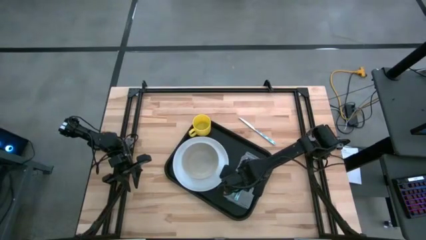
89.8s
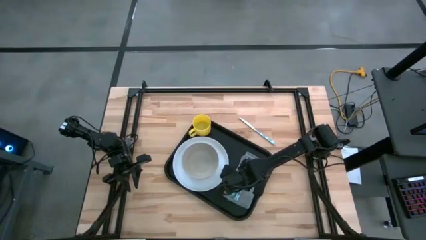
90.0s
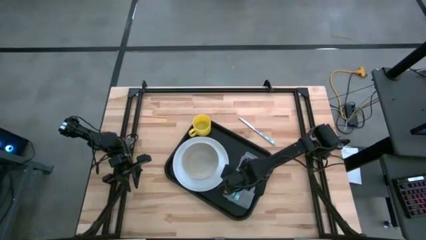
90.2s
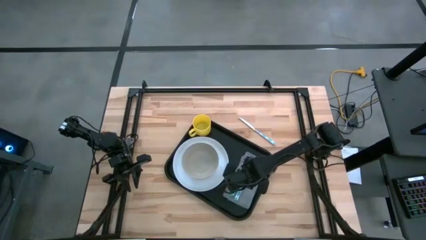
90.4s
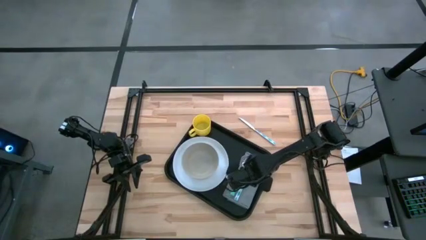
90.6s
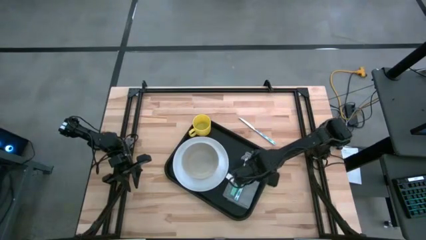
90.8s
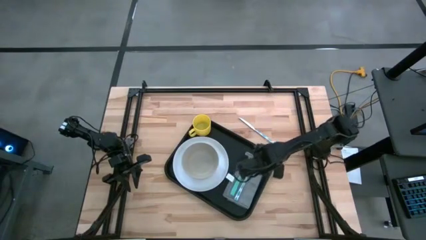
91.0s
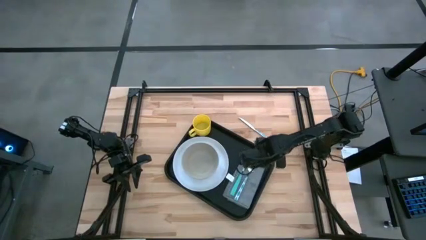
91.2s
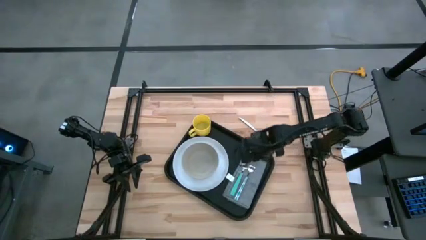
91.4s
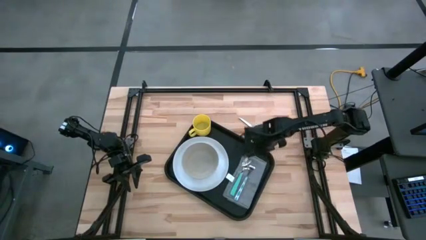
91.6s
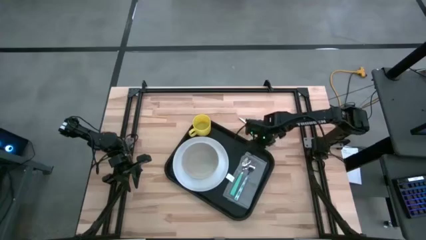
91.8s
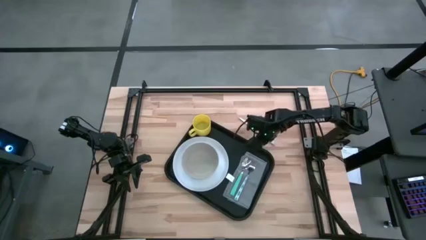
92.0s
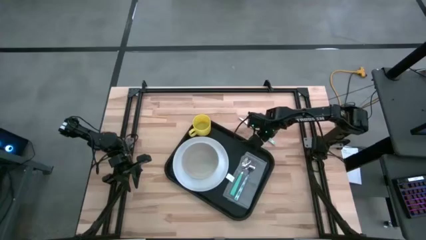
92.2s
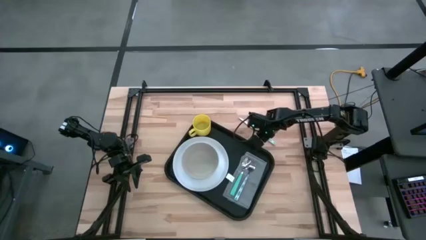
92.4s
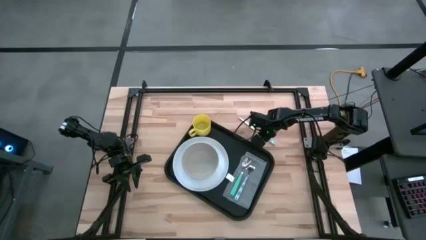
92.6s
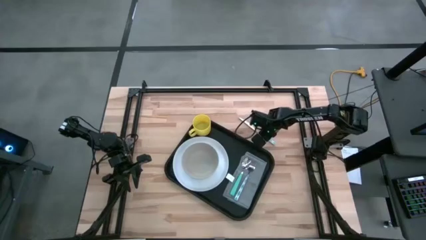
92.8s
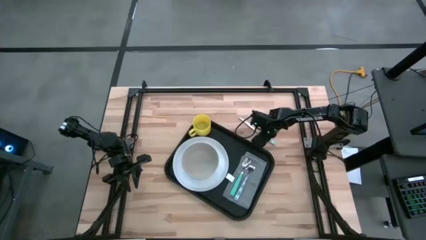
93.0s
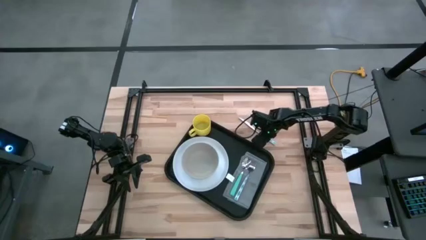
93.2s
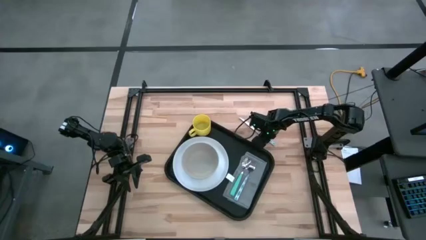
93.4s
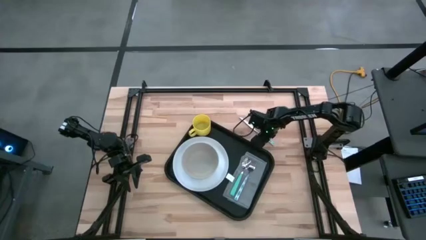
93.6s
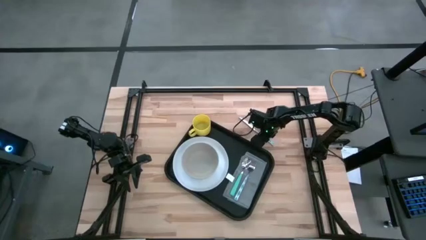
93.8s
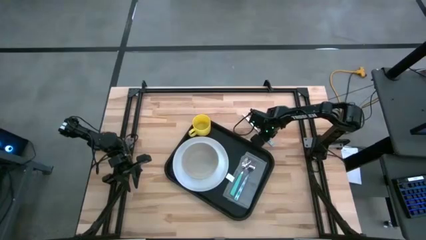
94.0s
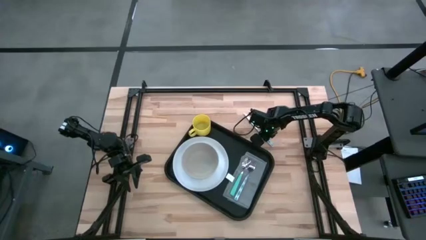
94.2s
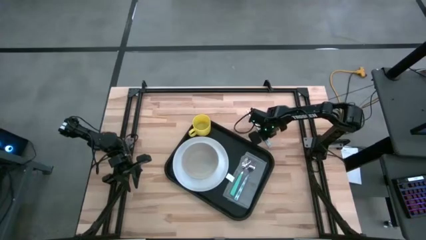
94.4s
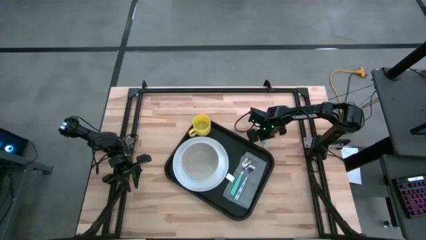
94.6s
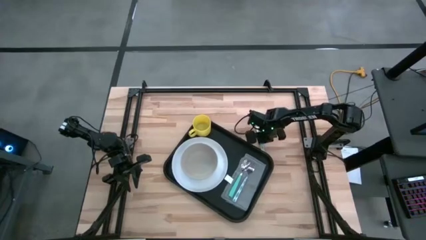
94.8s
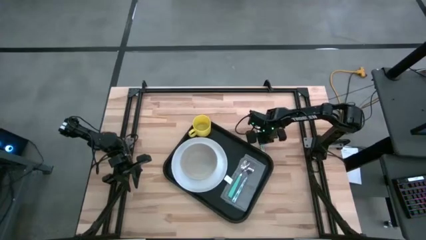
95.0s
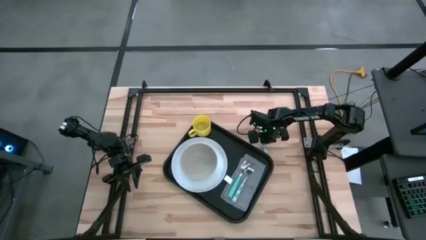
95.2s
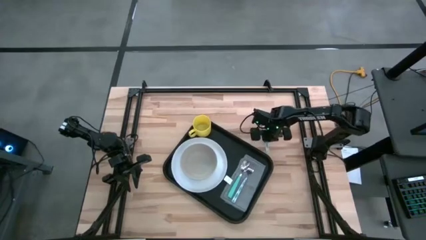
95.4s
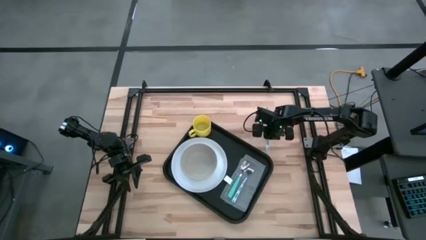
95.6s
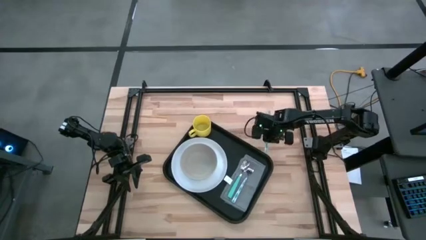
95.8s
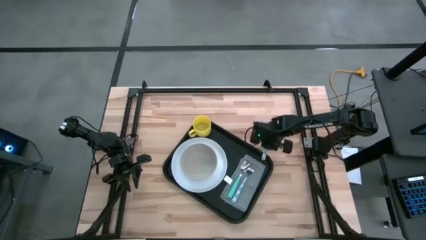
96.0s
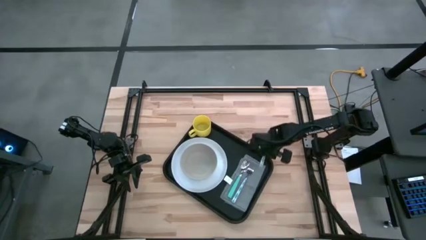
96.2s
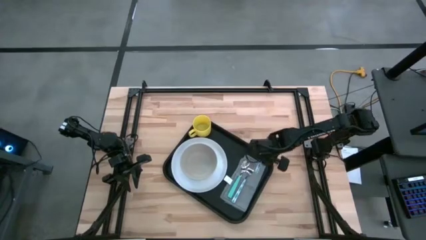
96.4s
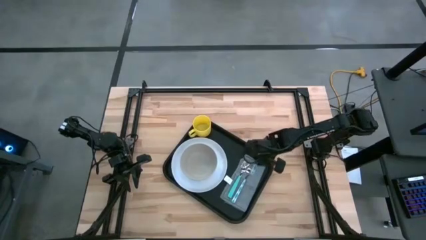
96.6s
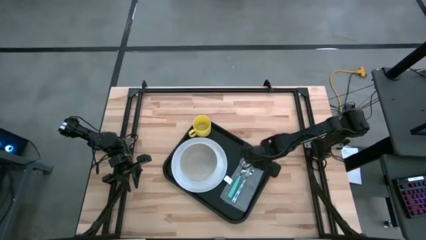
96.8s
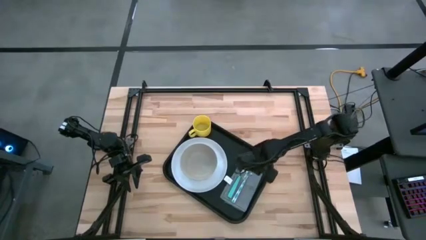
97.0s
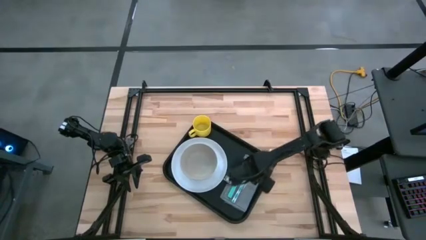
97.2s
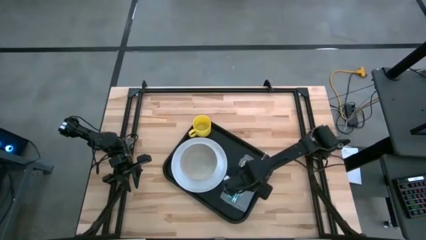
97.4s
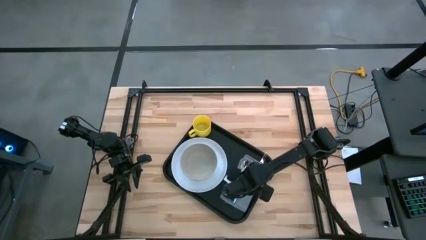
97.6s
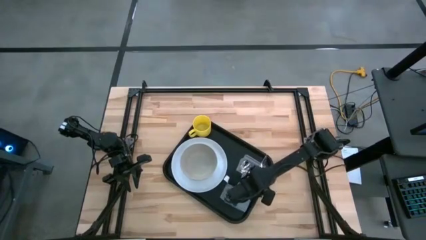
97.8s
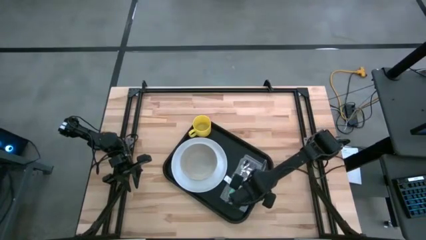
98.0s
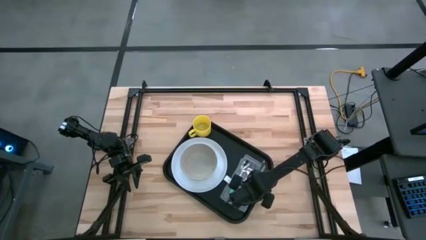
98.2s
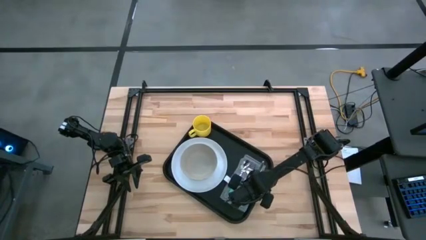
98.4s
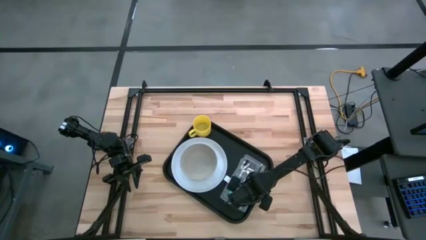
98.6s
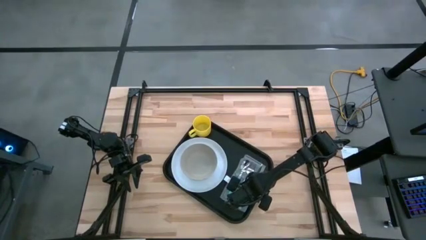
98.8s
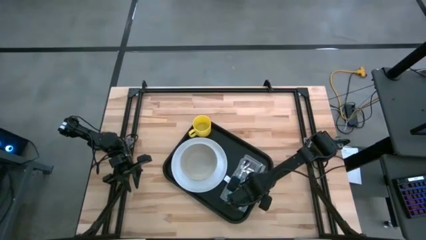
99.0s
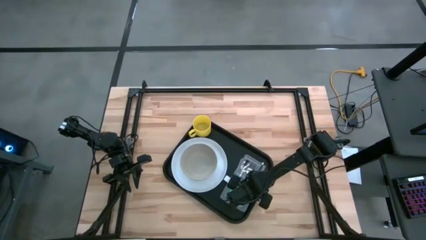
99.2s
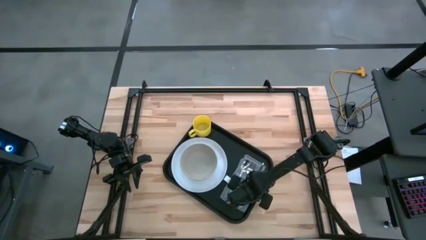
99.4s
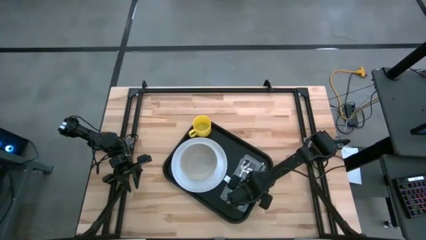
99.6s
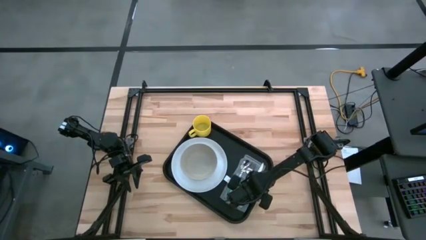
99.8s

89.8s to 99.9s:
Task: Set up tray
Put the blue knife on the gray napkin to the right of the blue fork

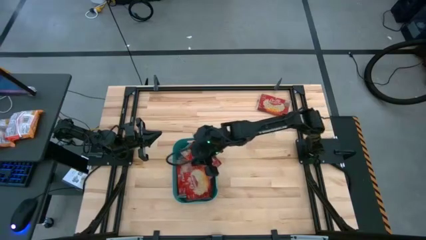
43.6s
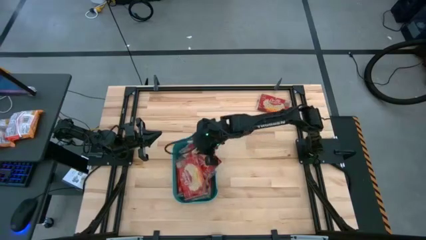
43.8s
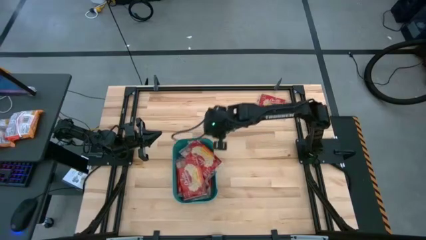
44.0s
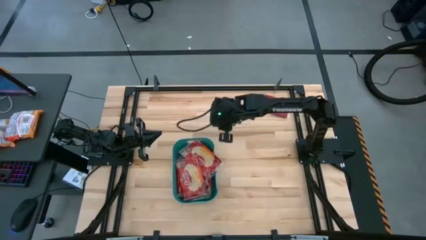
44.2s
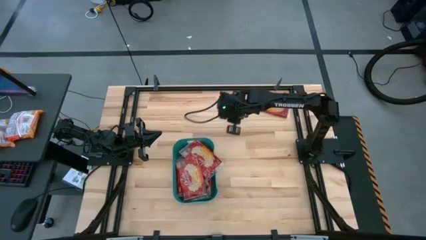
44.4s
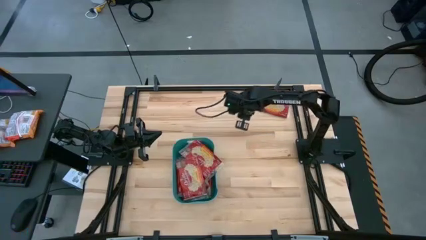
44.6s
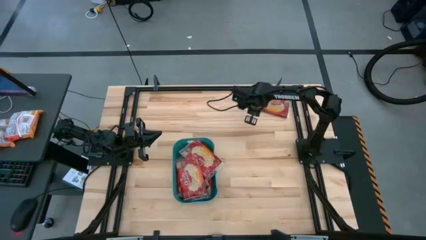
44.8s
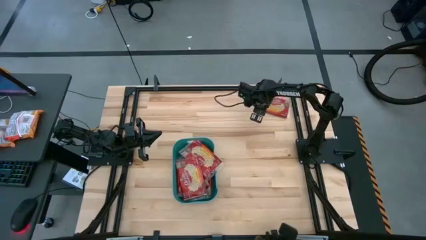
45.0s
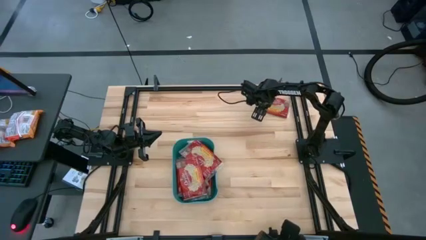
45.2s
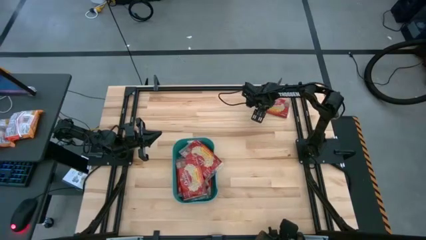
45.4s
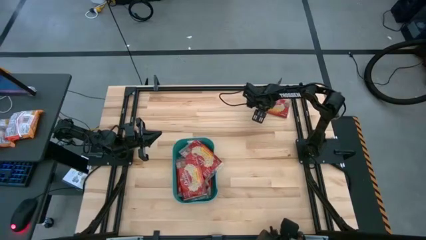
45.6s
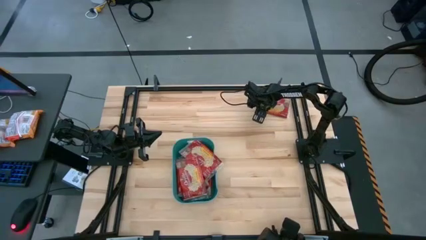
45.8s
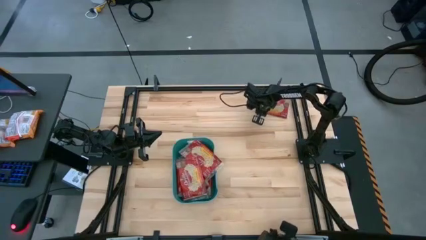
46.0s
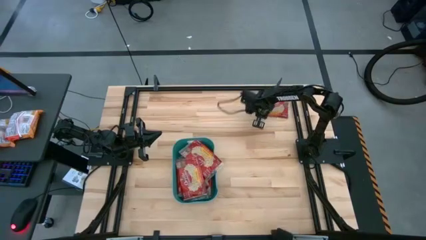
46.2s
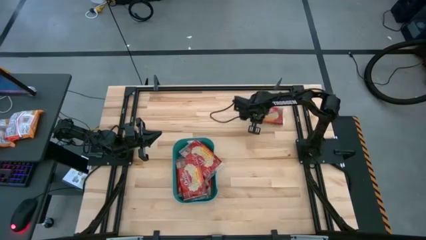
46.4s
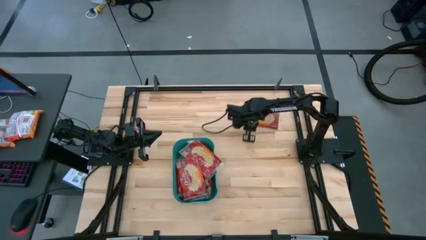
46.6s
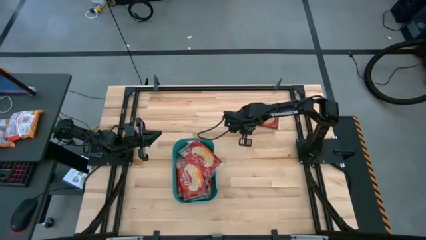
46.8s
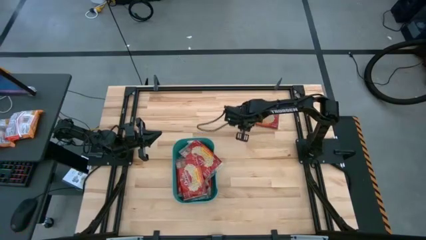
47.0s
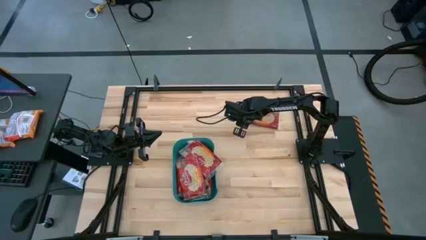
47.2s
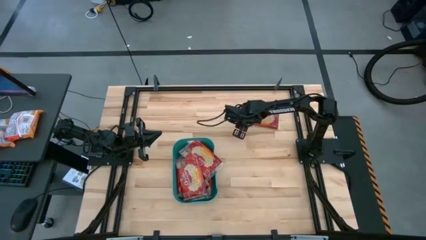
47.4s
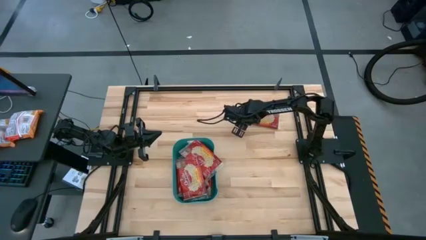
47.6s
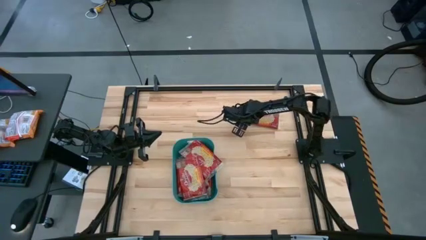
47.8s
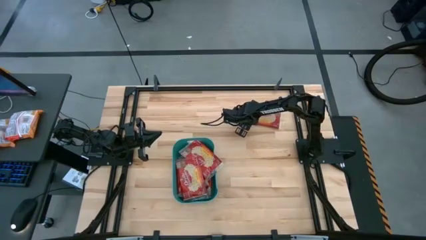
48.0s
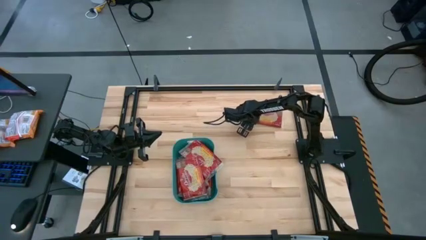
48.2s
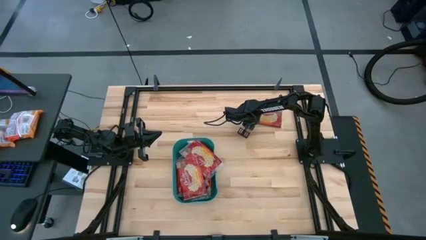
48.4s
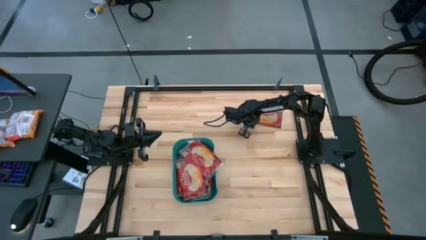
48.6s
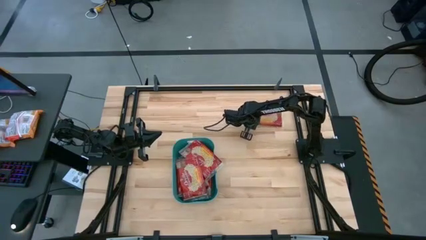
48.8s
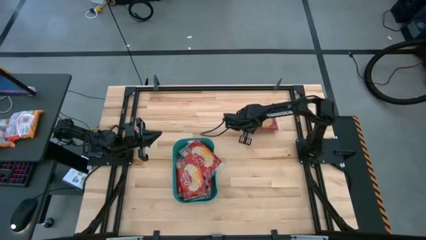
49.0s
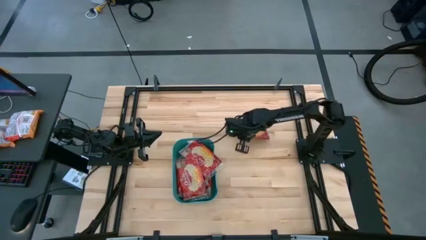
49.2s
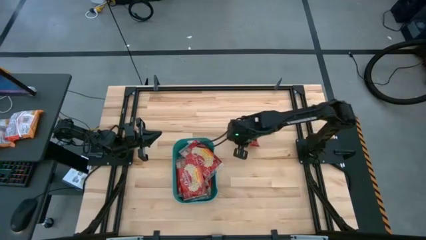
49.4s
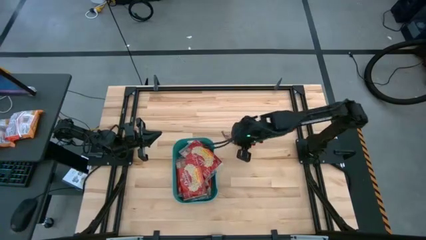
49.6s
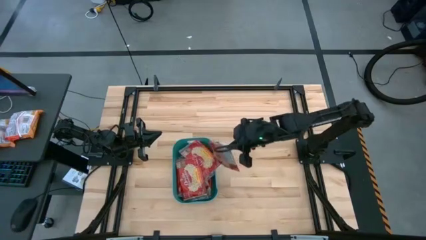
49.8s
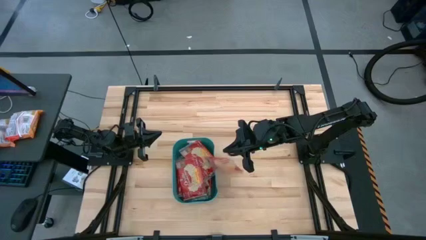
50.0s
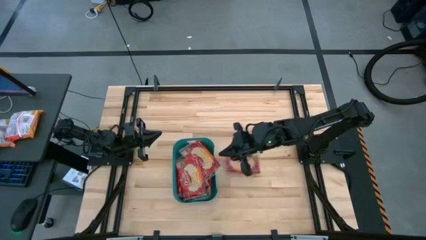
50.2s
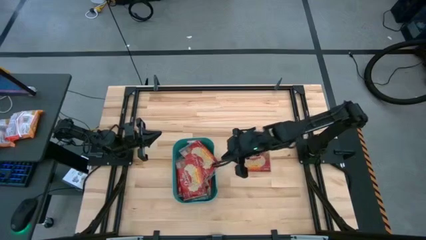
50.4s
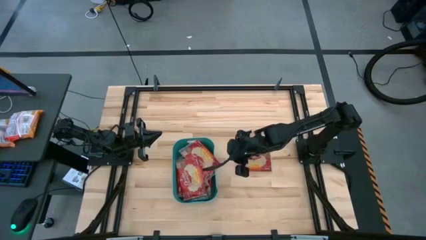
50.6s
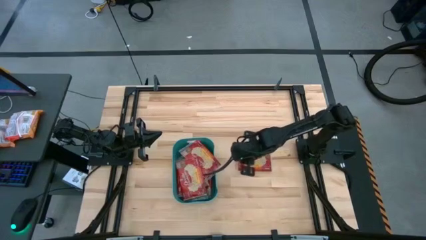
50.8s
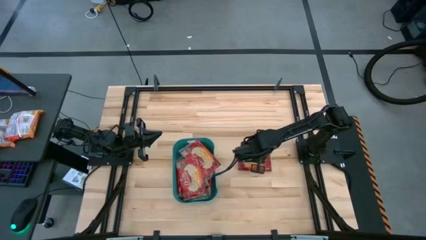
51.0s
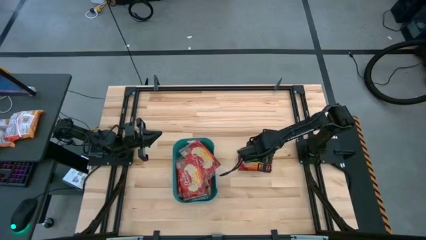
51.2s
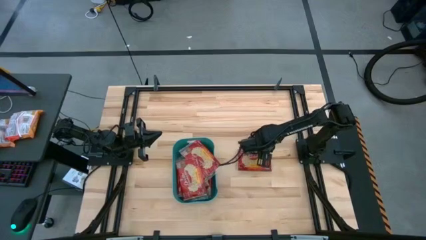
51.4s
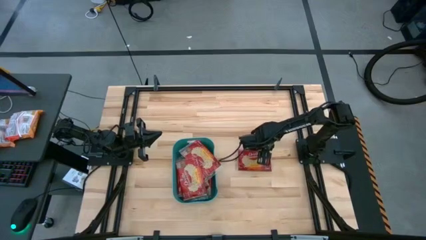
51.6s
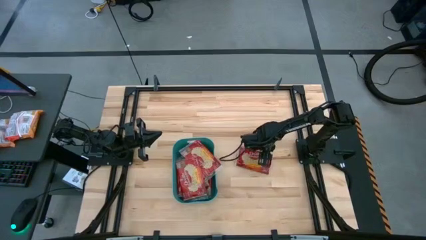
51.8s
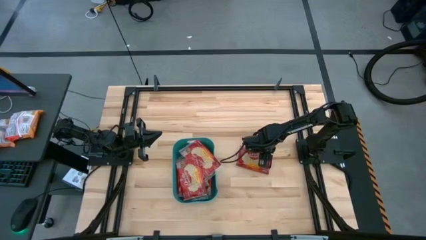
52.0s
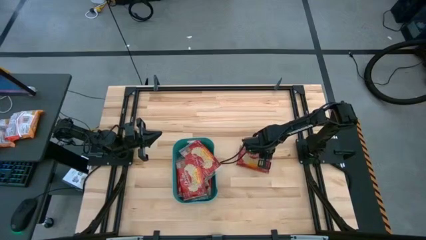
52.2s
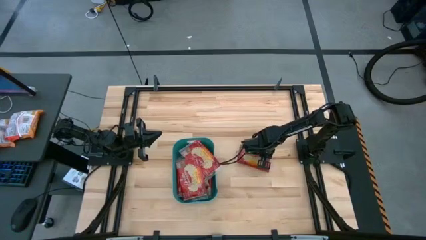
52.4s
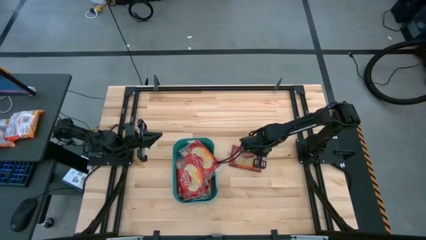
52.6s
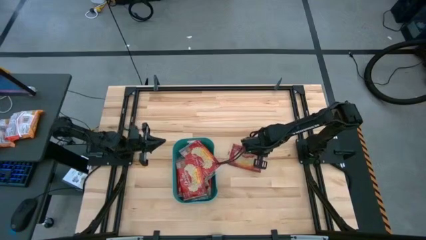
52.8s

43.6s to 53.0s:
Task: Sort popcorn bags into baskets
Put the red popcorn bag into the green bin
